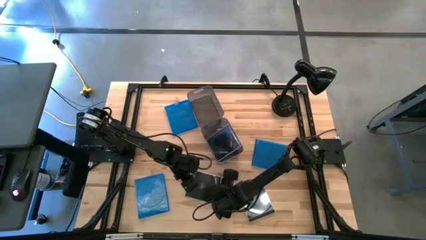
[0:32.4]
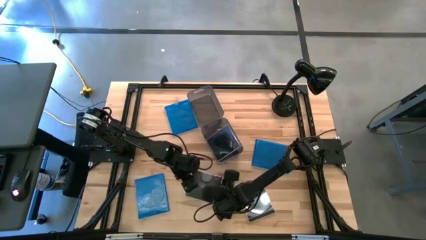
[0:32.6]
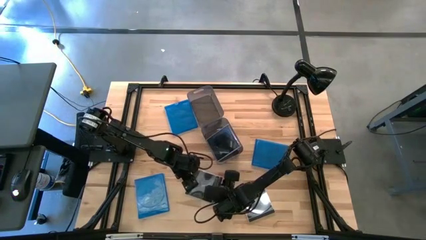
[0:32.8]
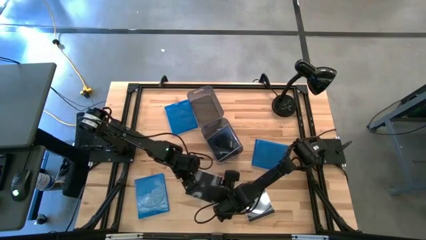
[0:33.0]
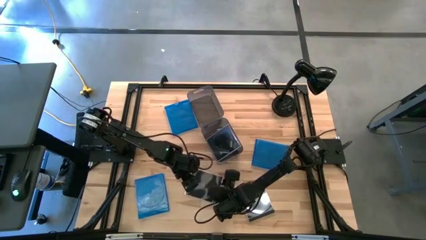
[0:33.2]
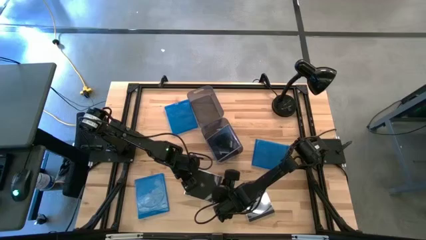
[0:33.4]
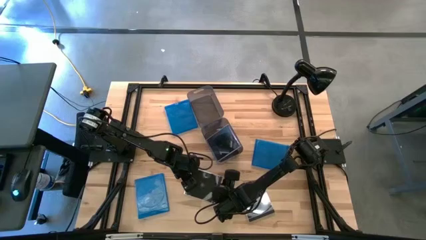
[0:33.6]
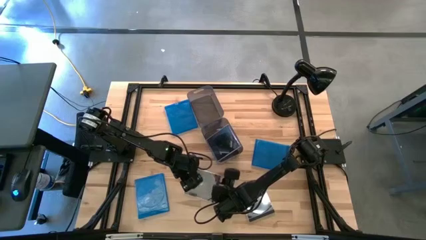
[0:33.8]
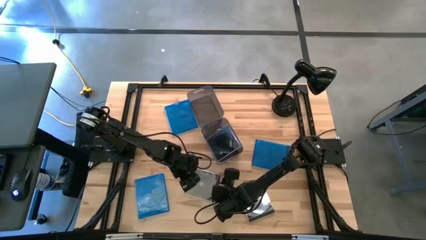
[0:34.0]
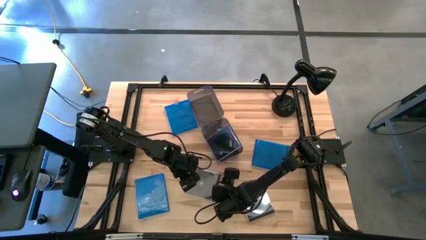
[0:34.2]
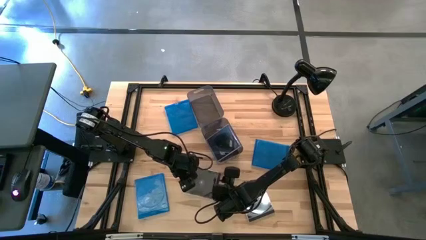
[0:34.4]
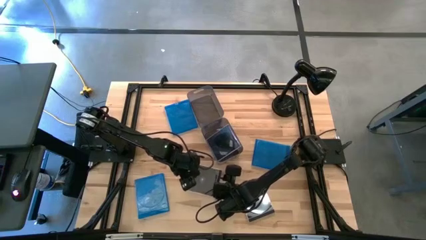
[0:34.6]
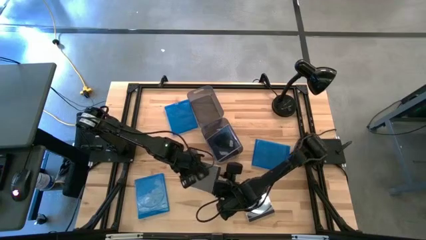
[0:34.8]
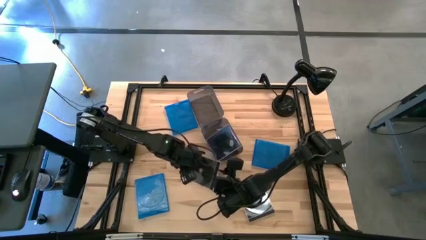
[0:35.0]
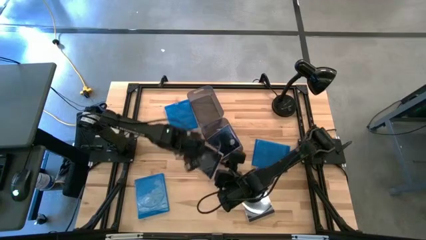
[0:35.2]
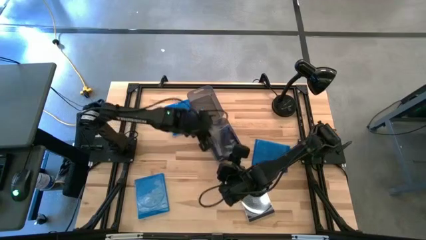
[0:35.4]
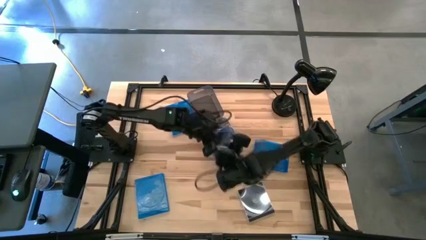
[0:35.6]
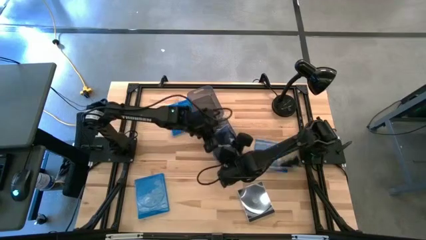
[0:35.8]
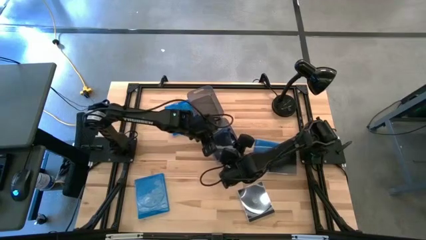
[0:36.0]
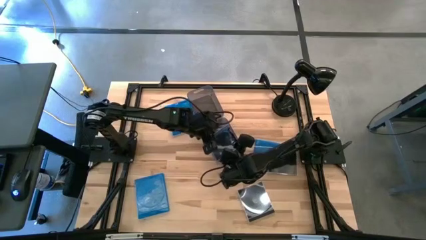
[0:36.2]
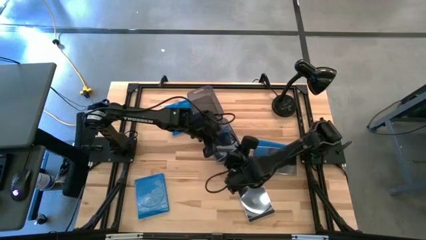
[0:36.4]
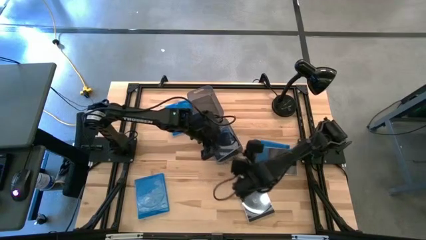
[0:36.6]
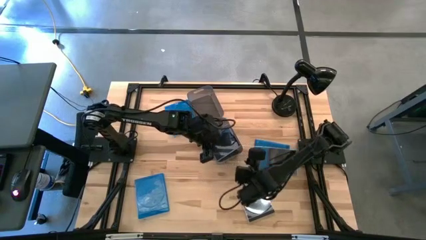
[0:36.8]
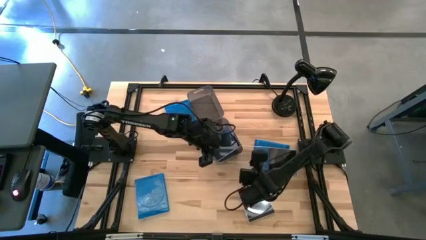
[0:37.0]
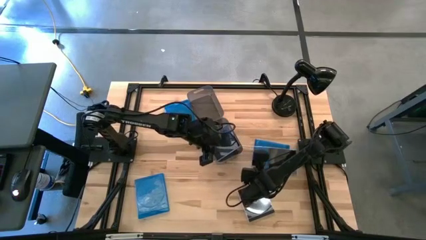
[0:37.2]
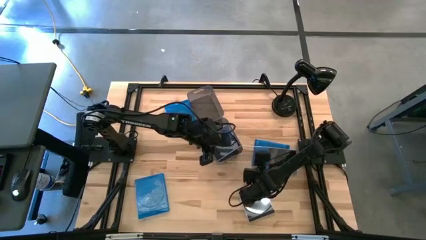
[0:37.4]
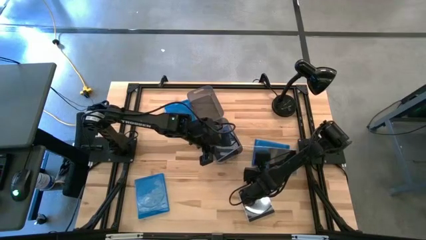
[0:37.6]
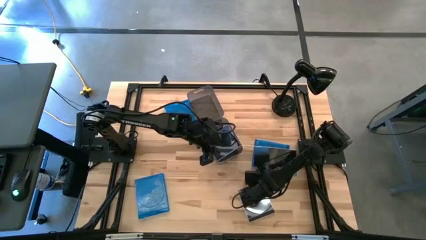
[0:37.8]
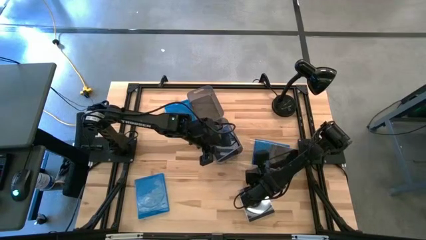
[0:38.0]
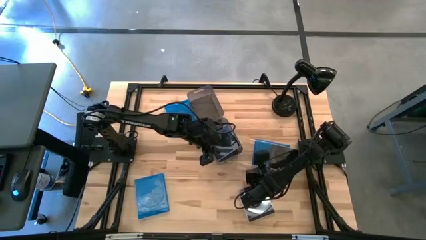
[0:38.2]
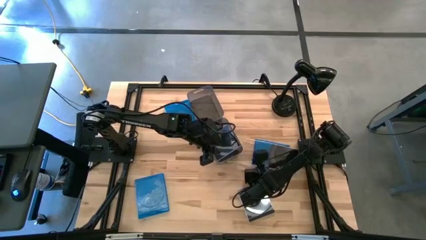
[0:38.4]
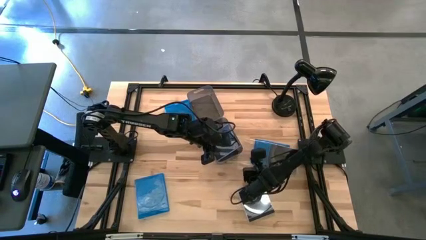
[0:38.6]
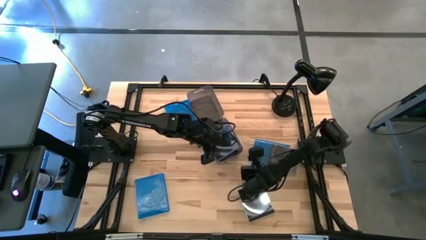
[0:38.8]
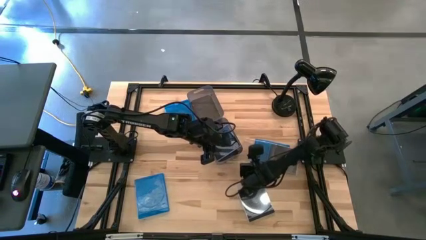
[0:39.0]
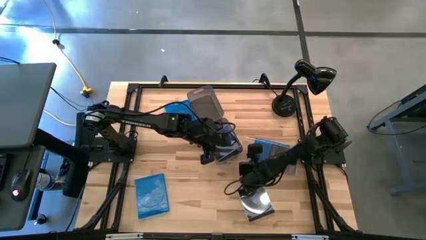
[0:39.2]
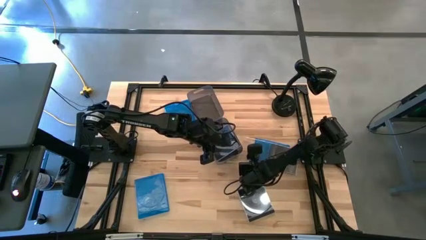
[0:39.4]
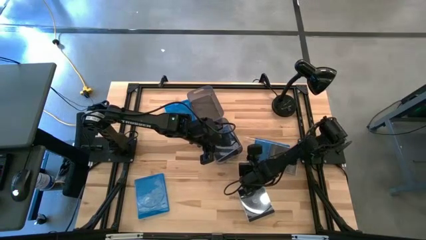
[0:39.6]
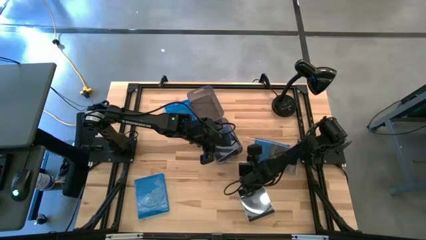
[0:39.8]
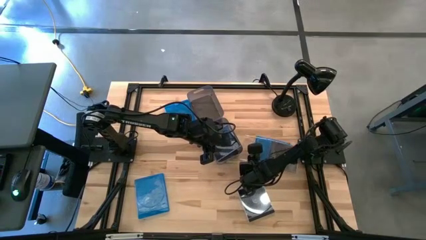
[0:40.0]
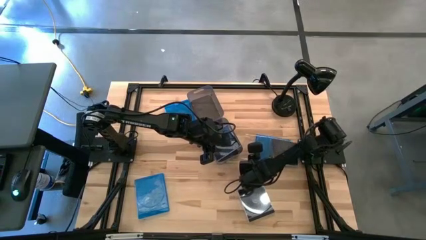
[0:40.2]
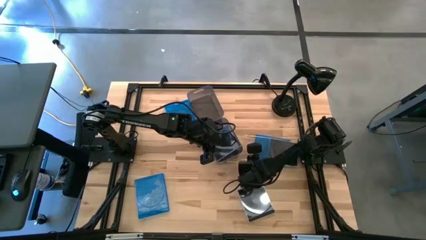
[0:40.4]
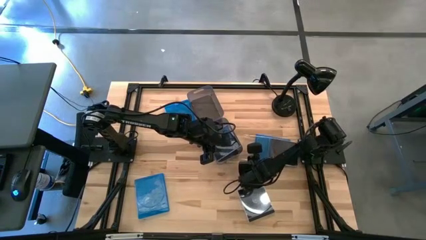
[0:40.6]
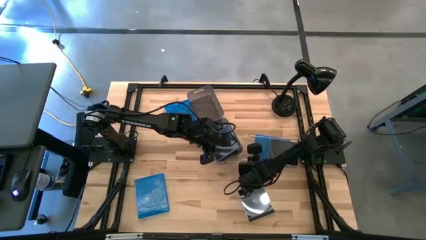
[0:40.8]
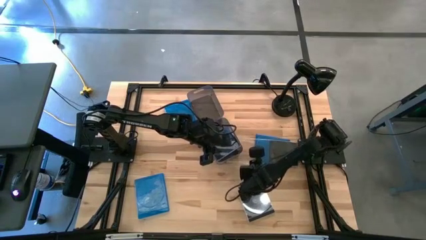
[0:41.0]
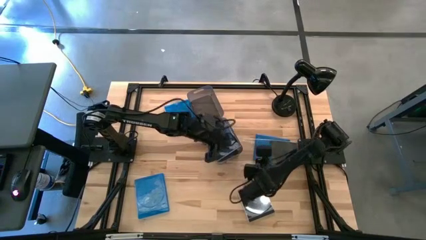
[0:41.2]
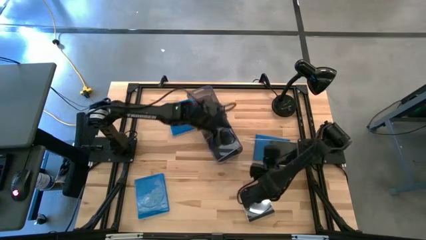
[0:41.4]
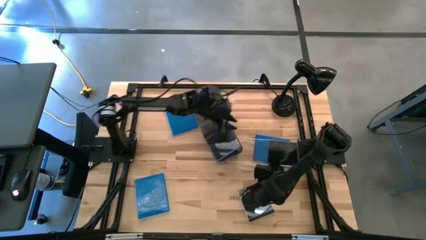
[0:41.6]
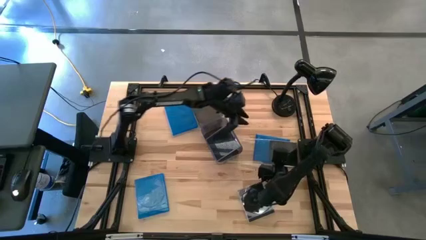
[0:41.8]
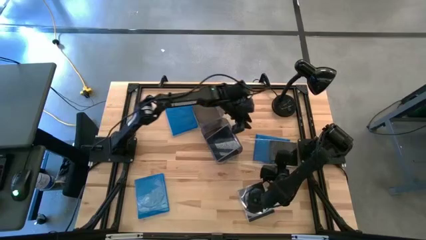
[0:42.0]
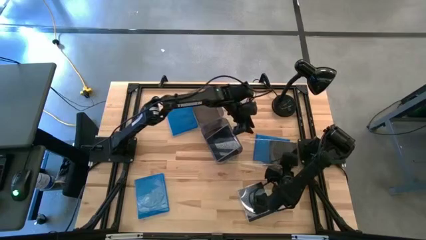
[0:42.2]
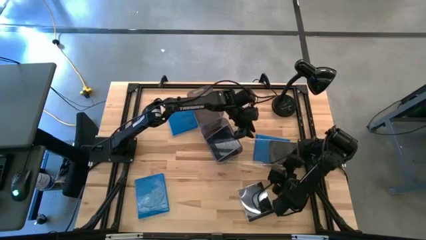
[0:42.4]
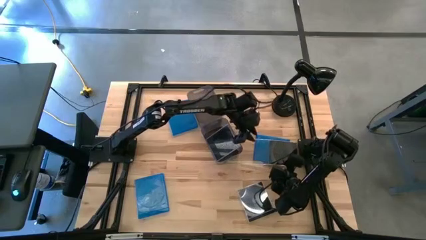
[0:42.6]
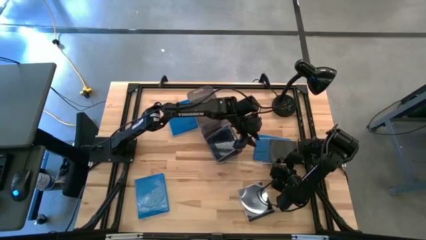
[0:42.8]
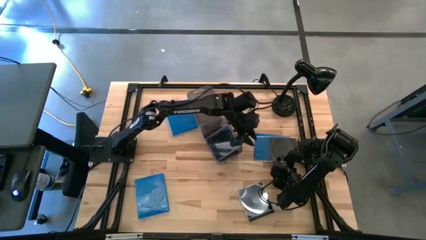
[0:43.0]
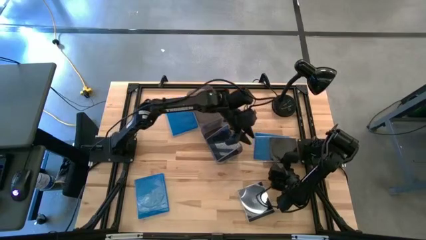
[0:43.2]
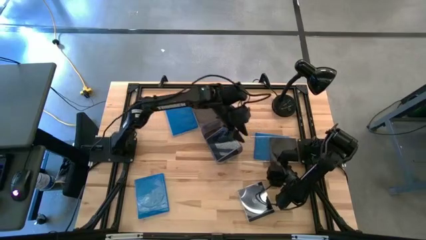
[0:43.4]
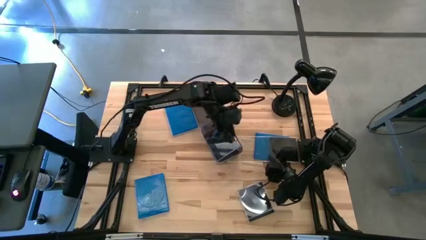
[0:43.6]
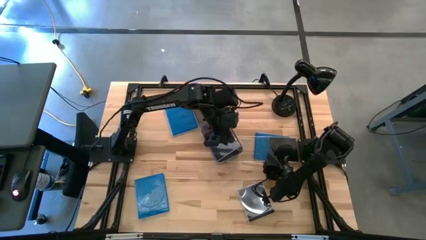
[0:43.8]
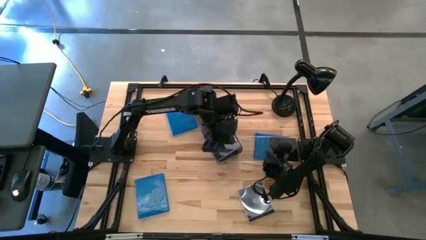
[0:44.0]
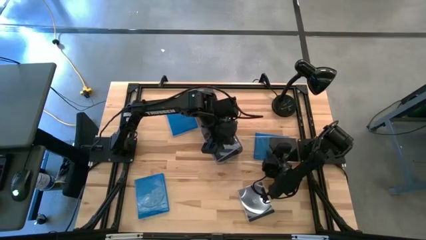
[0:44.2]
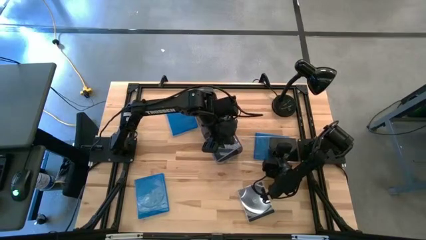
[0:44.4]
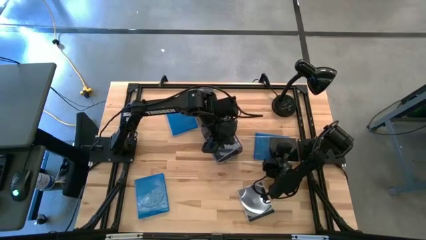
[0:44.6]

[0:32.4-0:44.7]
Task: Pick & place jewel cases by type
Put the left black CD case into the bottom black bin

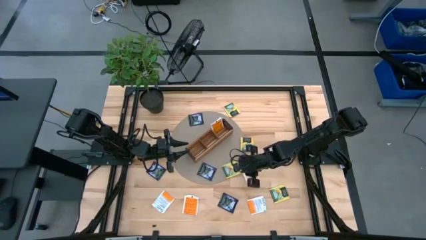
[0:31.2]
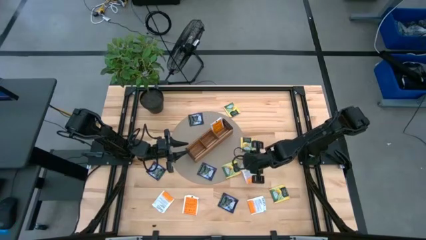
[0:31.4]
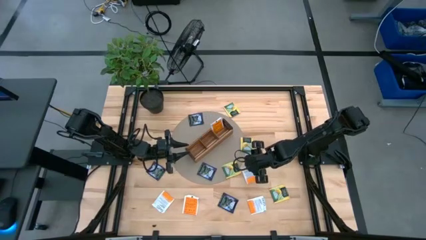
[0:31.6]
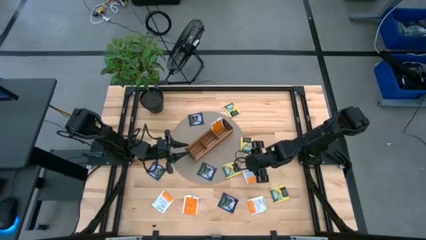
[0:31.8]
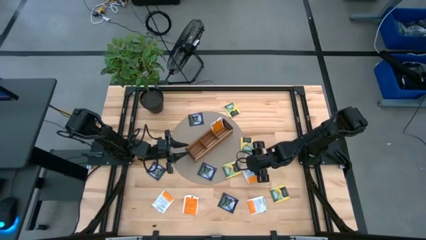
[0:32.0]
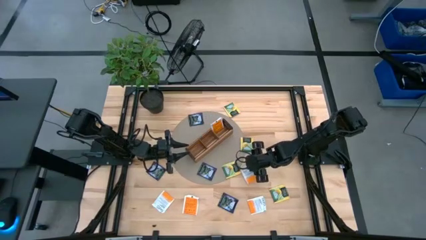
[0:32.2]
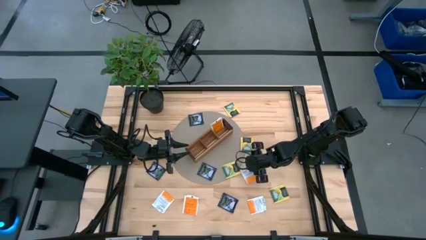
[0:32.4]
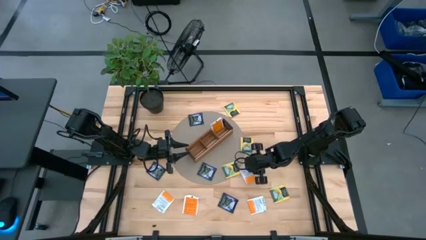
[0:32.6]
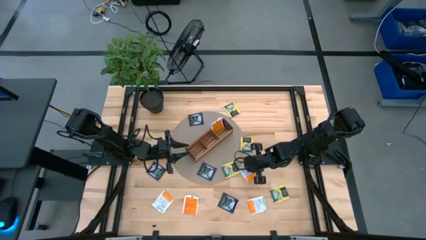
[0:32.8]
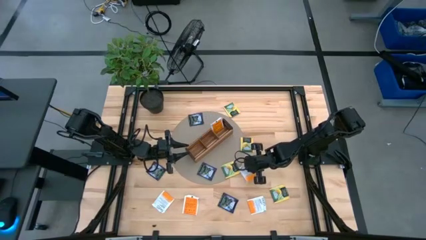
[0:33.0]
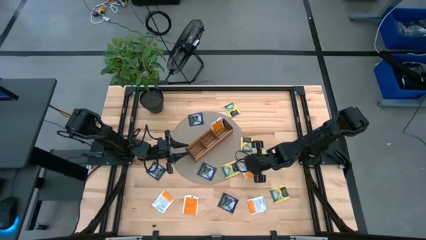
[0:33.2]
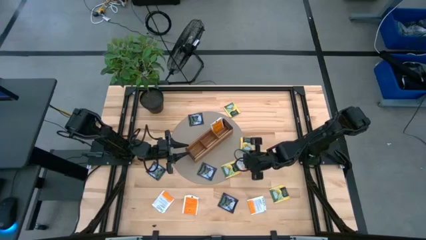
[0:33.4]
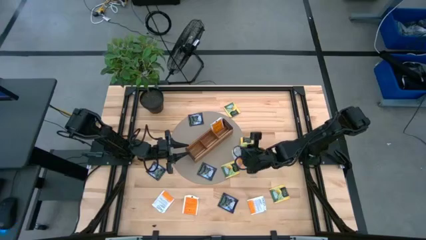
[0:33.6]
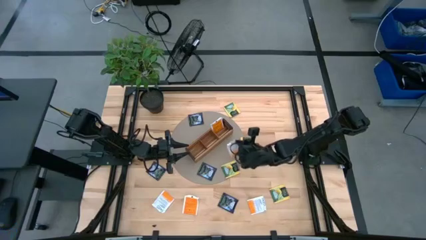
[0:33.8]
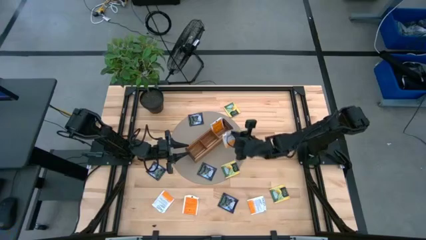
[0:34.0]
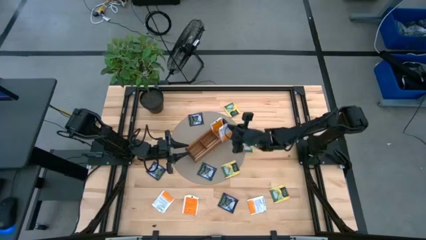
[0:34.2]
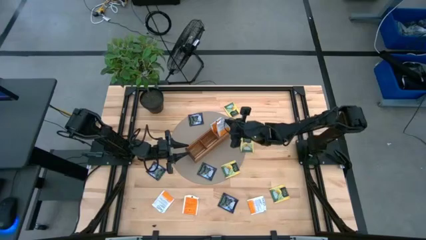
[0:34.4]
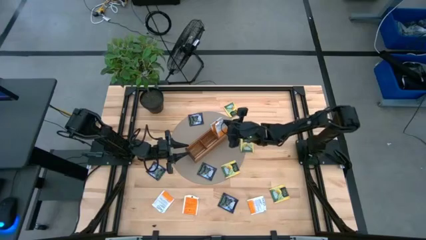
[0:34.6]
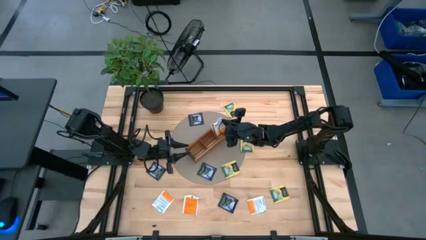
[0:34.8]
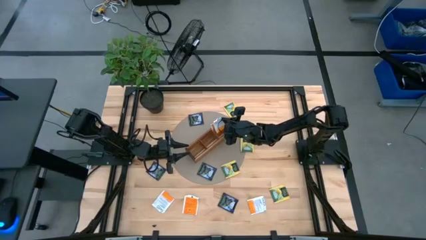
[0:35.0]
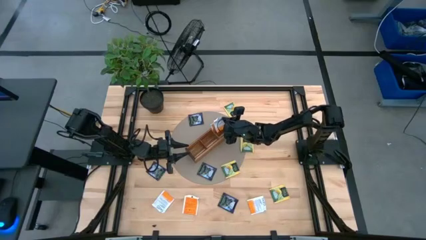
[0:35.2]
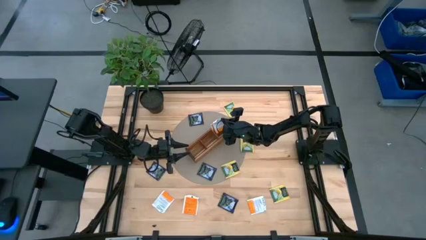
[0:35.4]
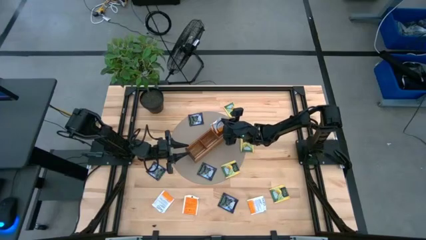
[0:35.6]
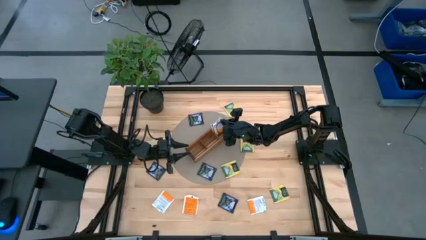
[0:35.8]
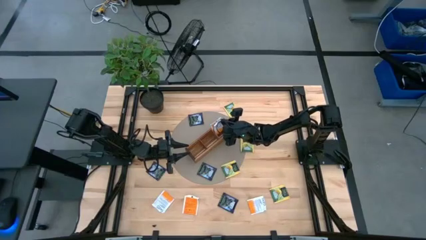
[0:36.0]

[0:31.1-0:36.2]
Task: Pick & Place Tea
Put the orange tea bag into the right section of the wooden organizer
